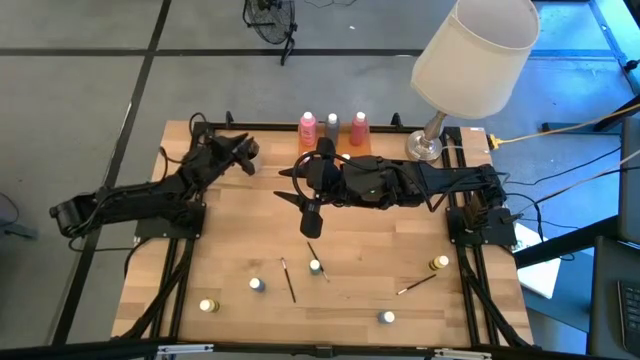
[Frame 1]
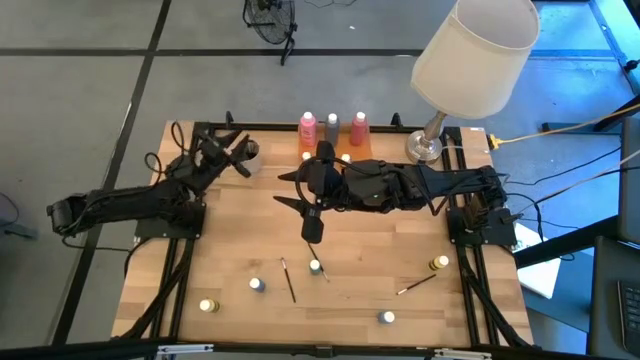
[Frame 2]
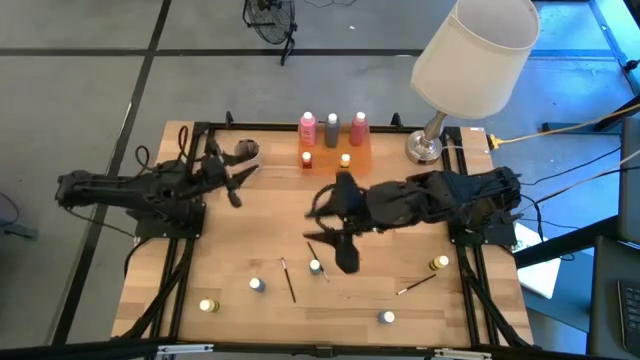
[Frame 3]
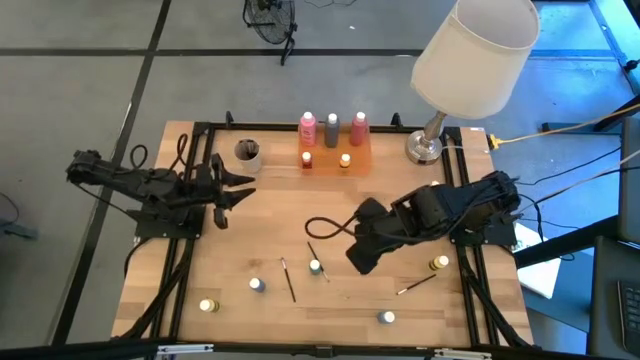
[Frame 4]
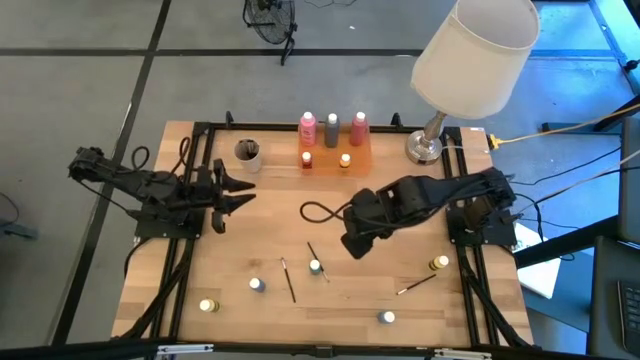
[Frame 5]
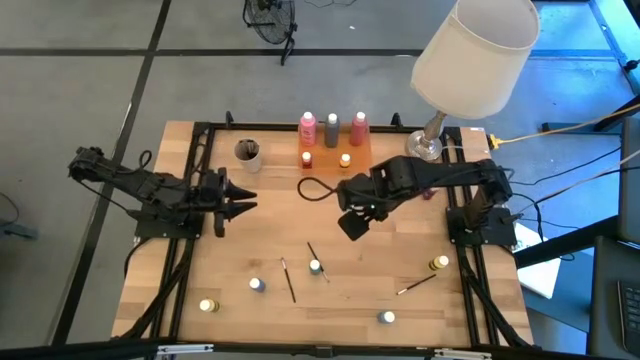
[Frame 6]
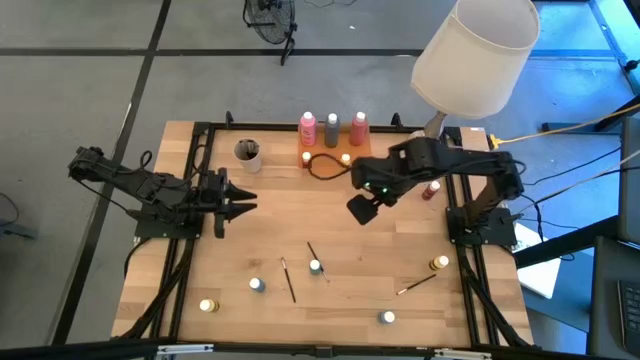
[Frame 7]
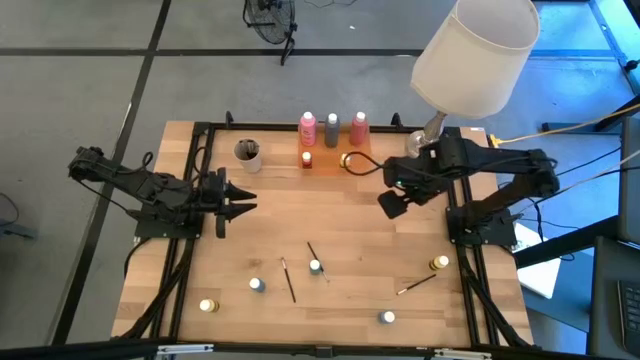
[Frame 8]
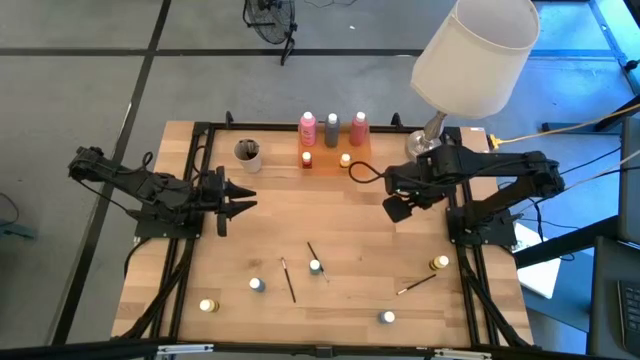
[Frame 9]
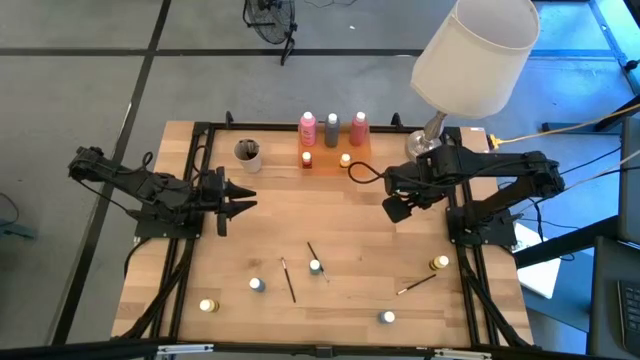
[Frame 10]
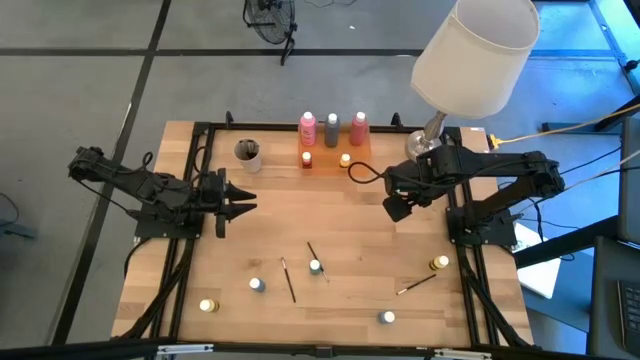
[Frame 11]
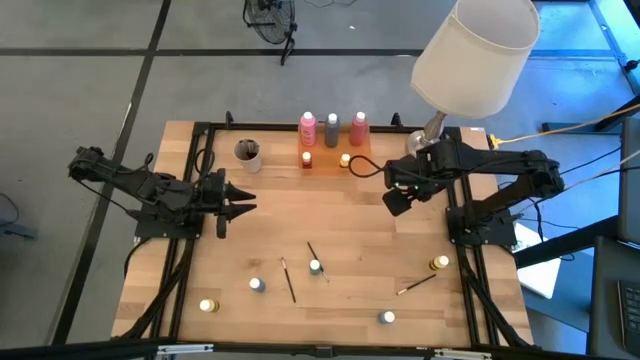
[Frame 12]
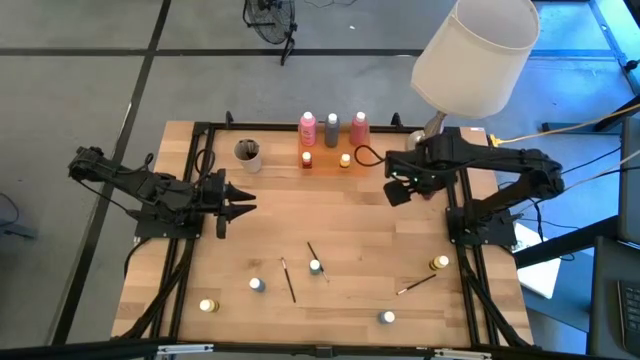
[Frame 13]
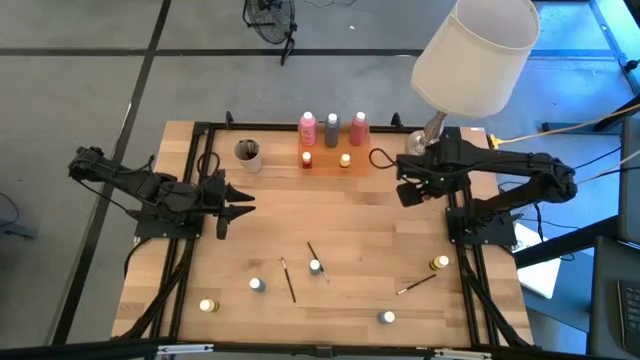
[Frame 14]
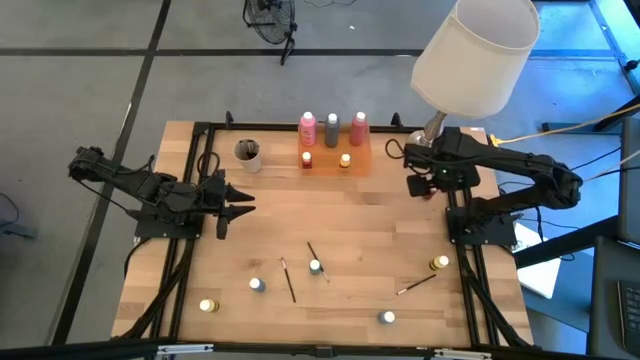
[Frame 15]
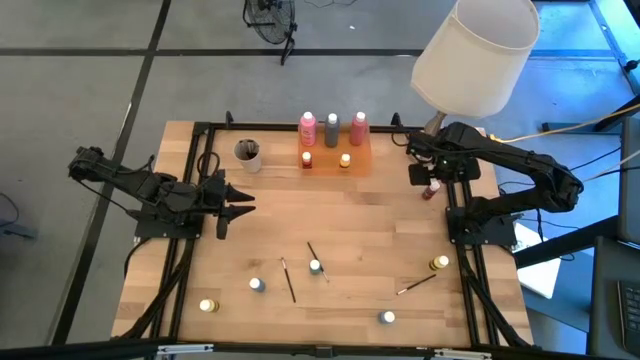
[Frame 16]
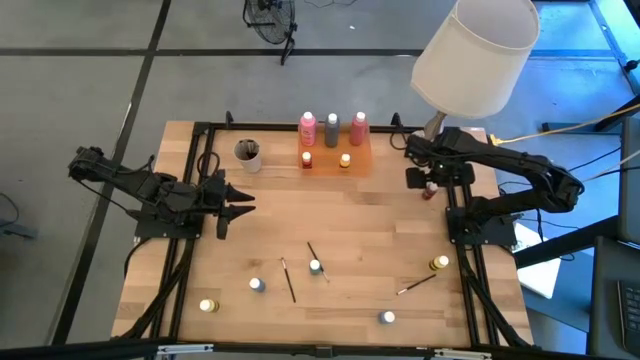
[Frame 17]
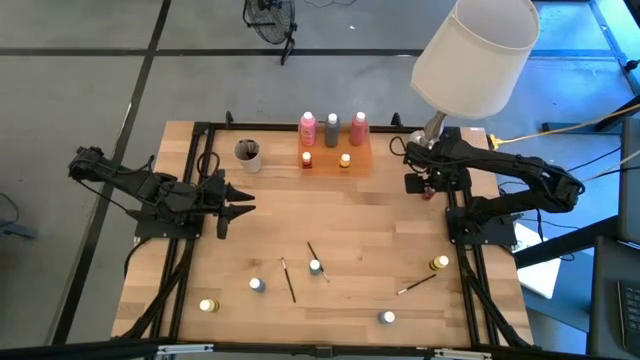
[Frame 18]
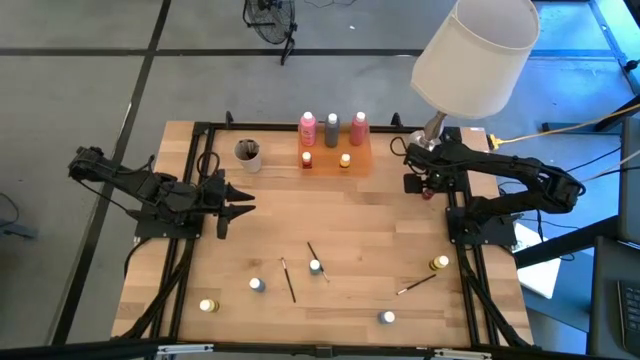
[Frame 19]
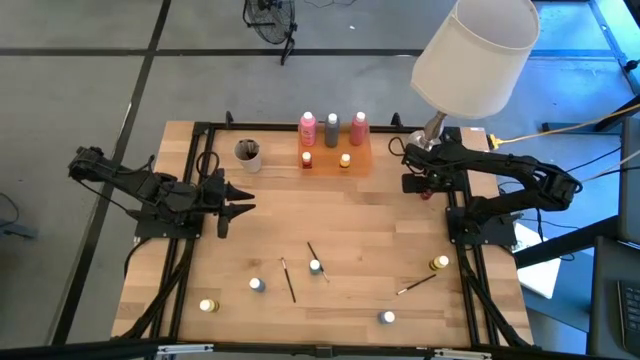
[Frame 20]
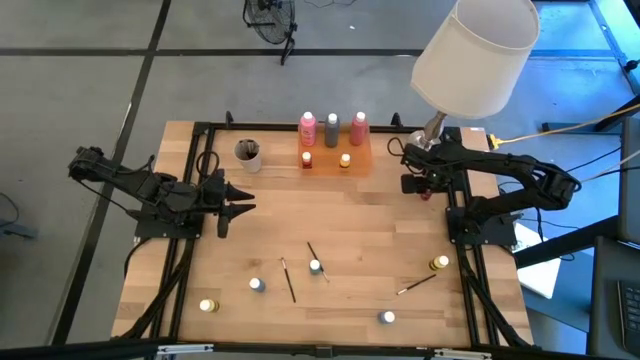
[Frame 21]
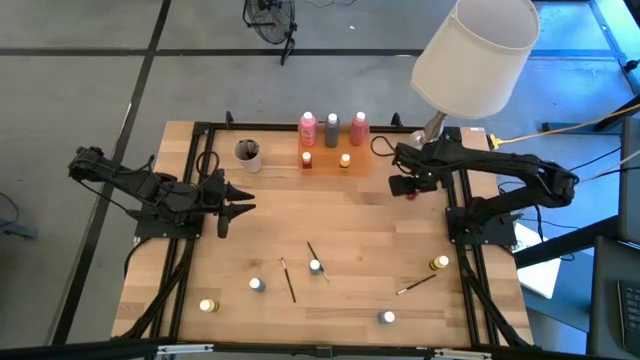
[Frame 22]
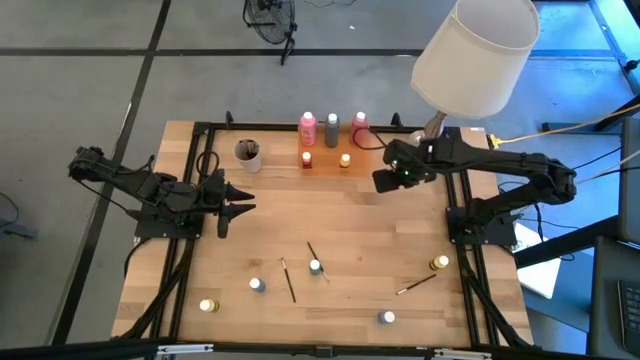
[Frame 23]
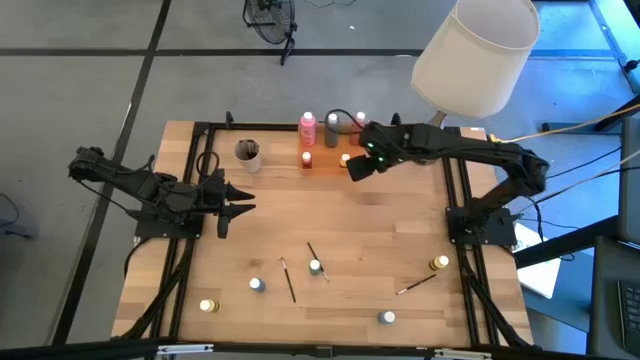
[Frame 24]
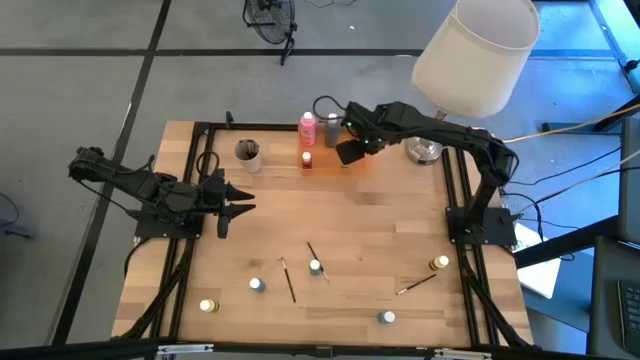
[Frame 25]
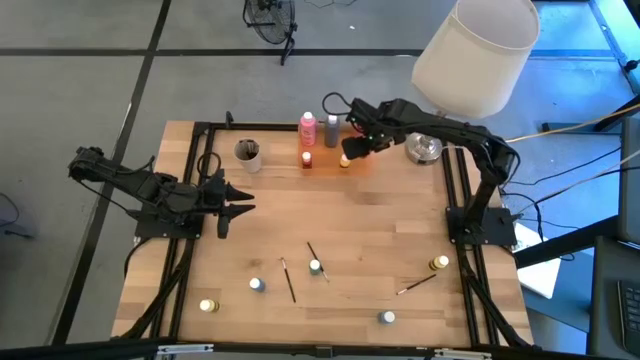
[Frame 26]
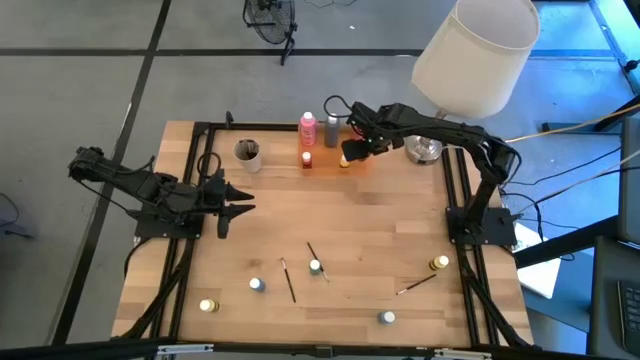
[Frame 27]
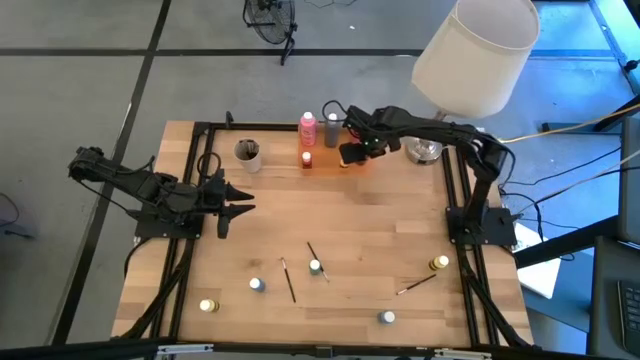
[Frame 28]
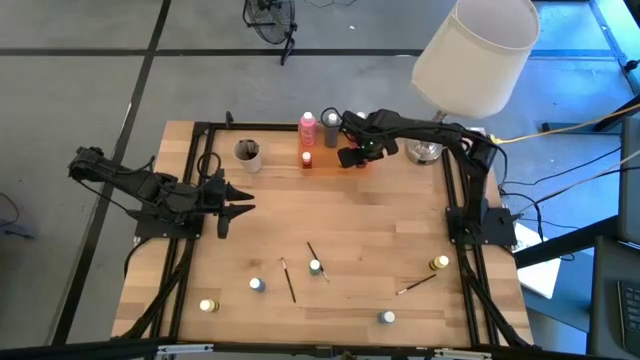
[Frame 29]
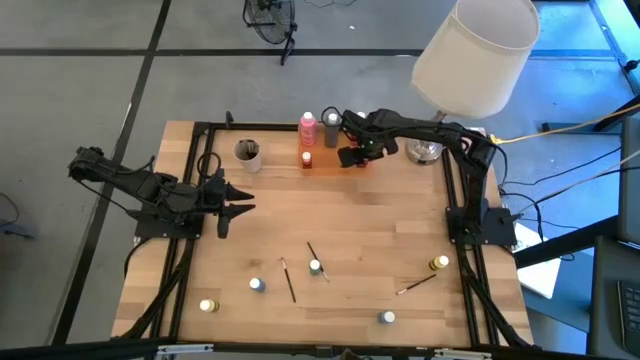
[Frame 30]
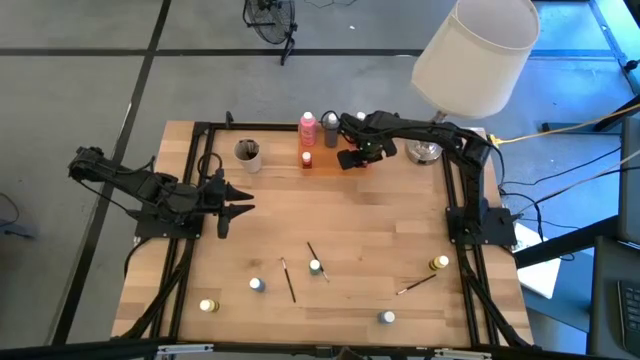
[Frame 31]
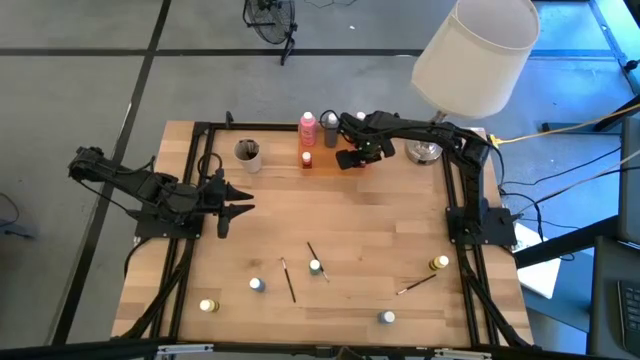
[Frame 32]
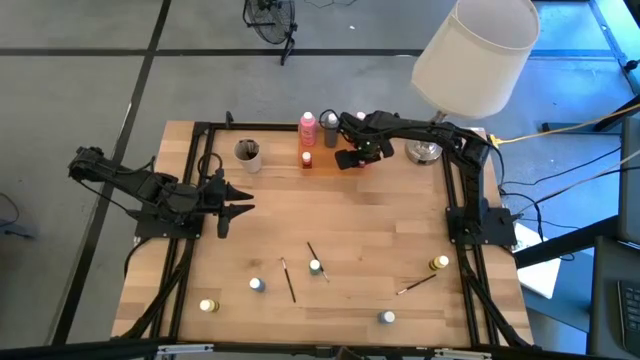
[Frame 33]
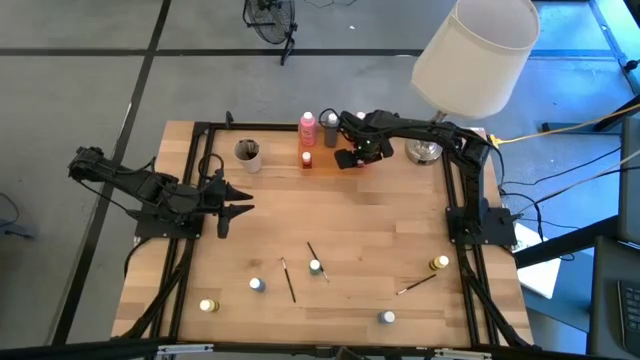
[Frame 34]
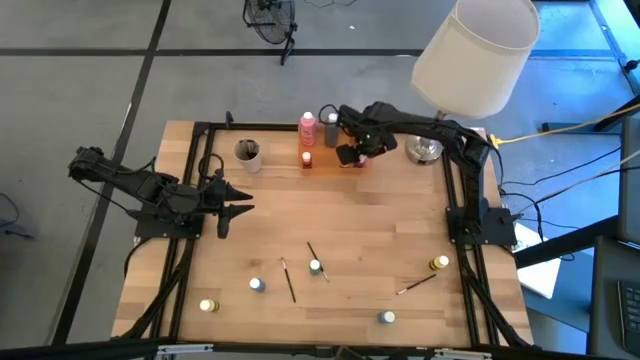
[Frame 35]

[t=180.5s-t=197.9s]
Task: Pick & Place Paint Supplies
Put the dark pink paint bottle into the orange bin

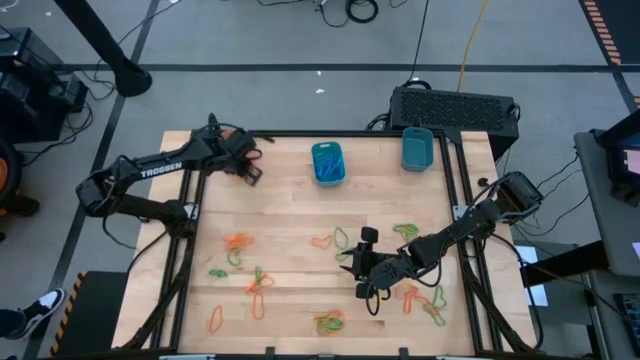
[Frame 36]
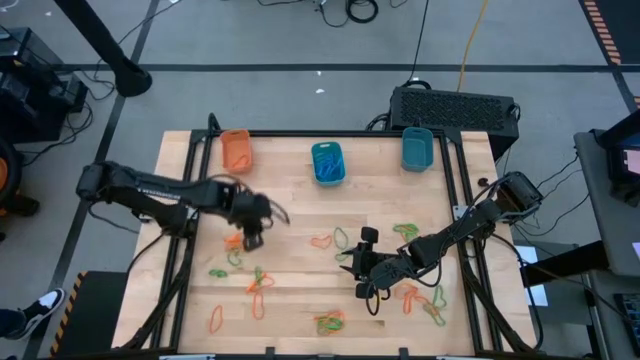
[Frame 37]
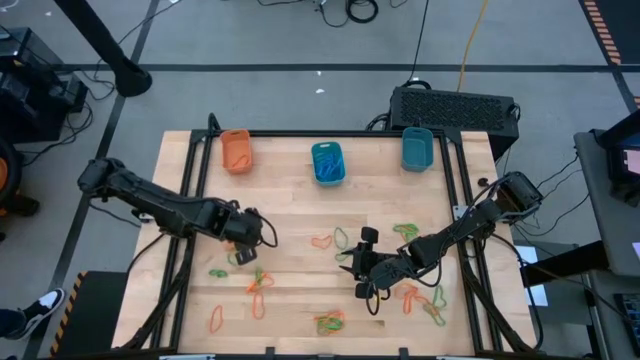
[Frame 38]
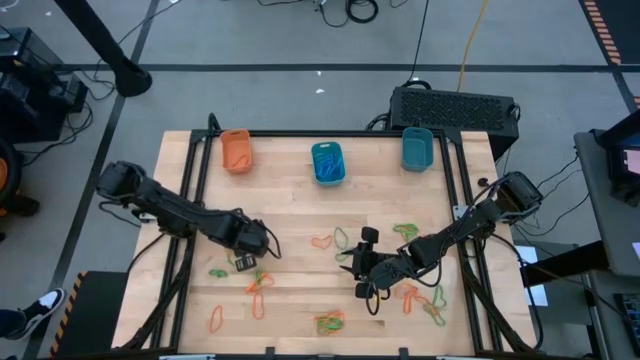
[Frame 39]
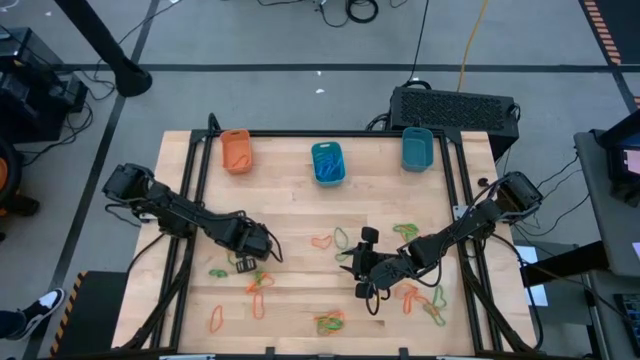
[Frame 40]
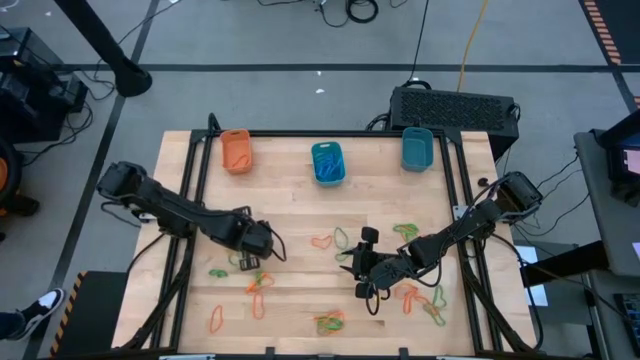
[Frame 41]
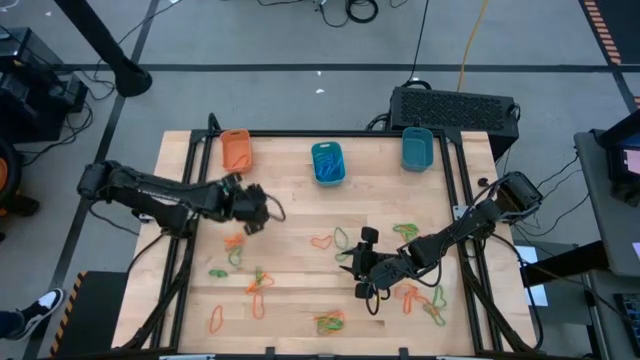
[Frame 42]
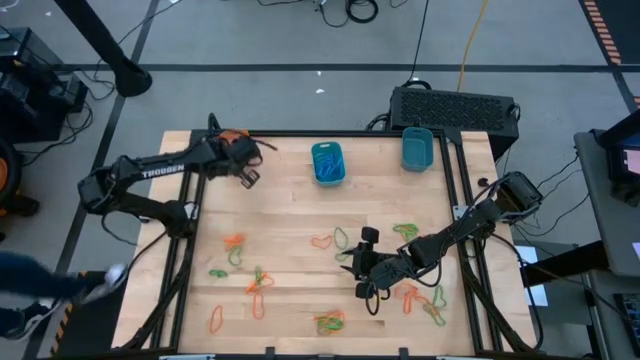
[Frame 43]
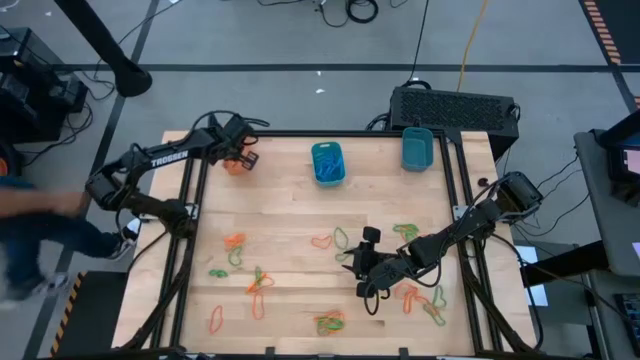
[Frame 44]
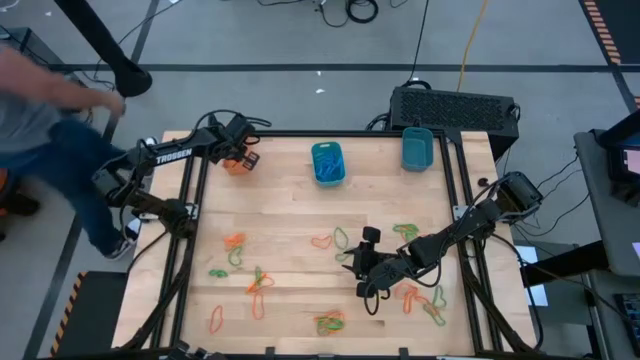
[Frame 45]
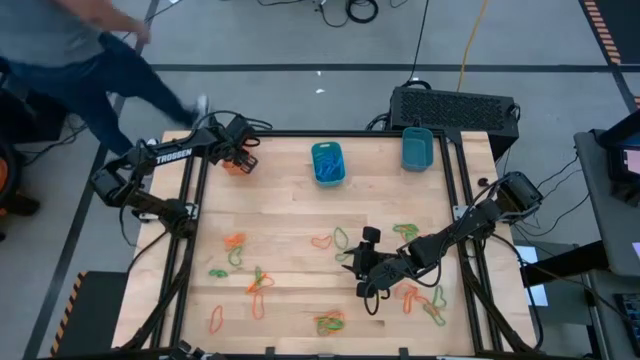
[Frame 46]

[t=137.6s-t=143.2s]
Task: Sort rubber bands into baskets
Put the orange rubber band into the orange bin
